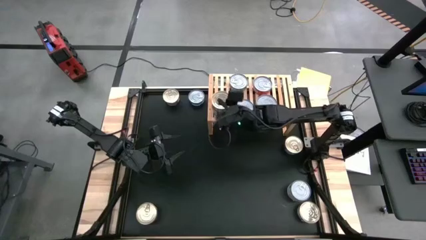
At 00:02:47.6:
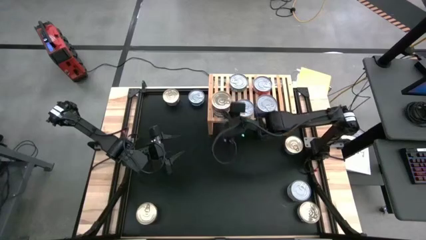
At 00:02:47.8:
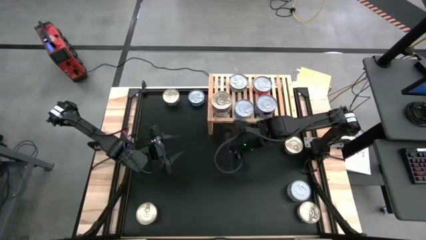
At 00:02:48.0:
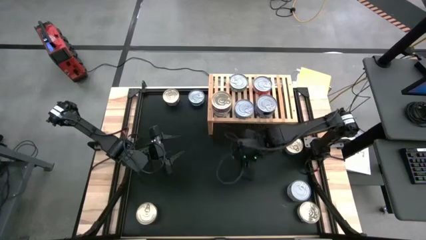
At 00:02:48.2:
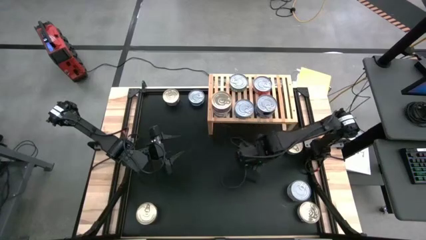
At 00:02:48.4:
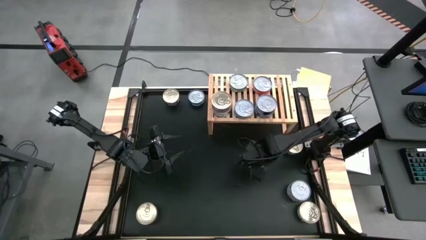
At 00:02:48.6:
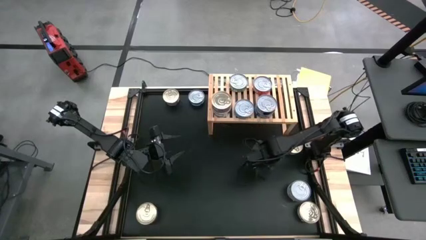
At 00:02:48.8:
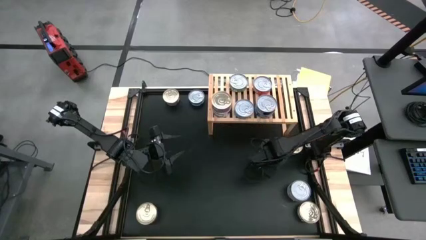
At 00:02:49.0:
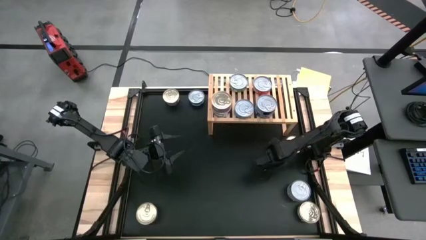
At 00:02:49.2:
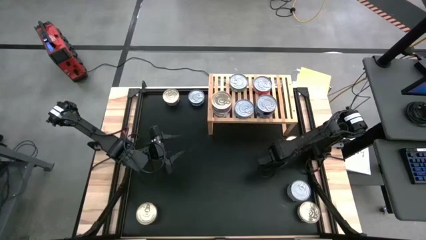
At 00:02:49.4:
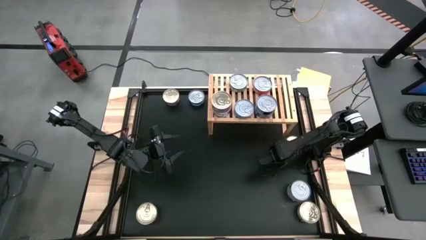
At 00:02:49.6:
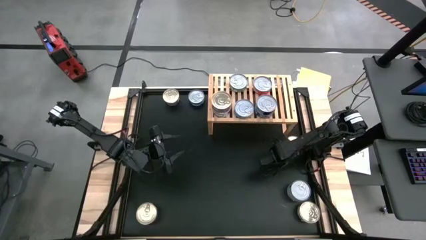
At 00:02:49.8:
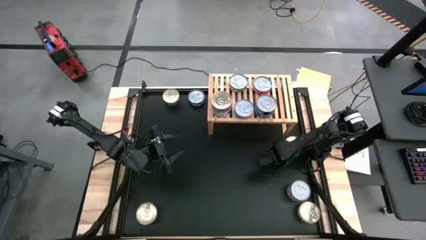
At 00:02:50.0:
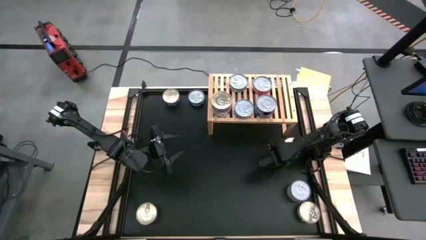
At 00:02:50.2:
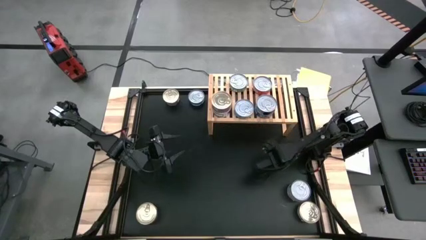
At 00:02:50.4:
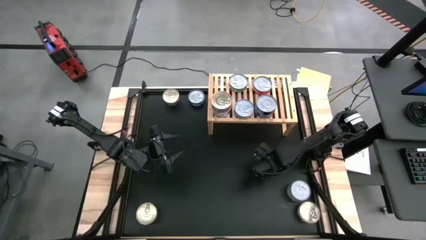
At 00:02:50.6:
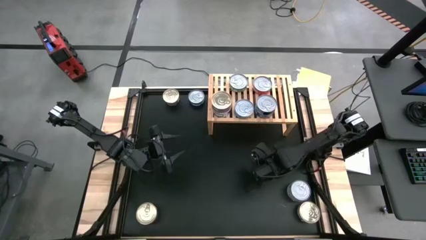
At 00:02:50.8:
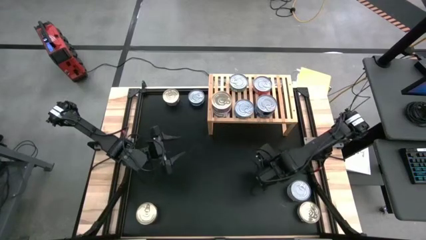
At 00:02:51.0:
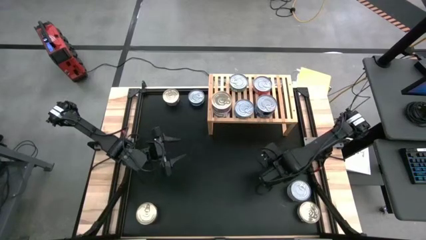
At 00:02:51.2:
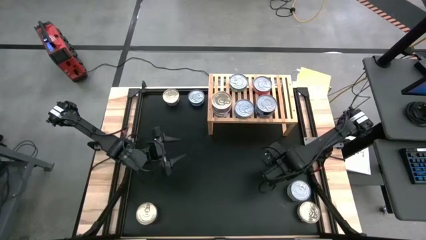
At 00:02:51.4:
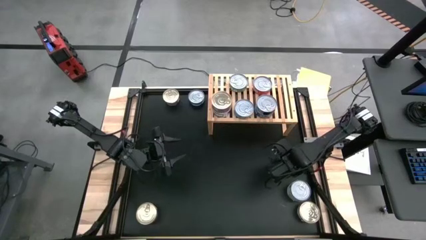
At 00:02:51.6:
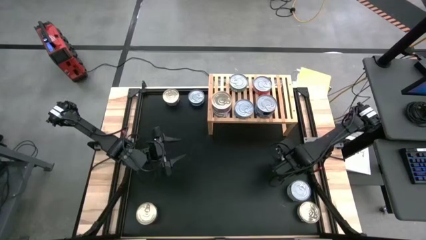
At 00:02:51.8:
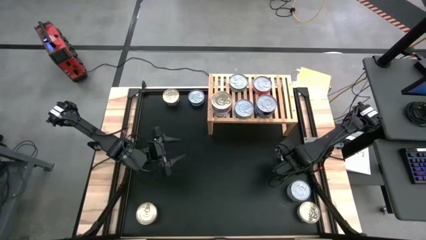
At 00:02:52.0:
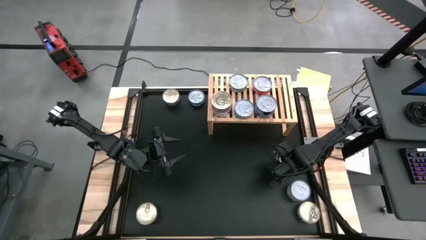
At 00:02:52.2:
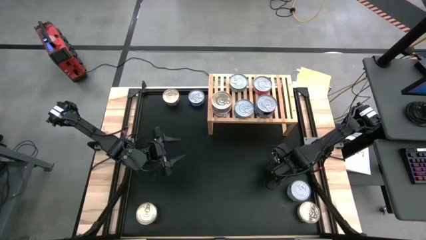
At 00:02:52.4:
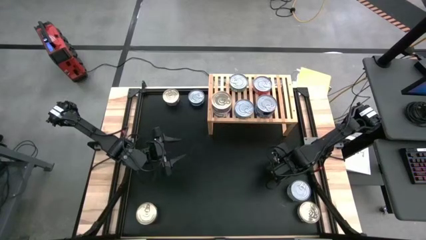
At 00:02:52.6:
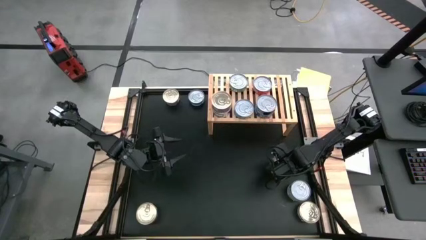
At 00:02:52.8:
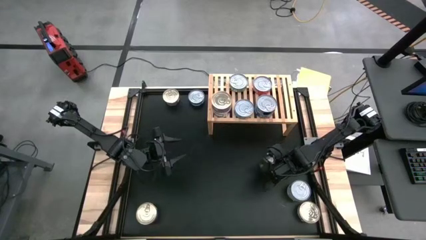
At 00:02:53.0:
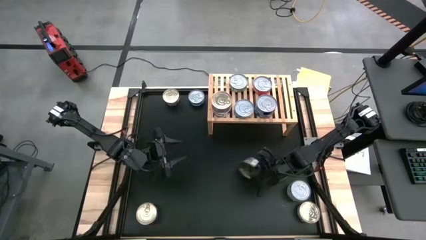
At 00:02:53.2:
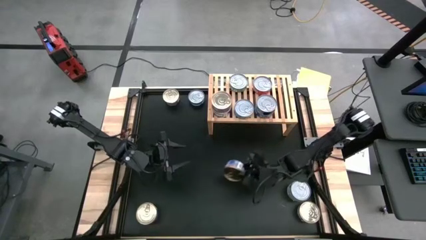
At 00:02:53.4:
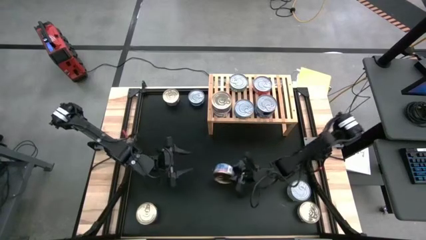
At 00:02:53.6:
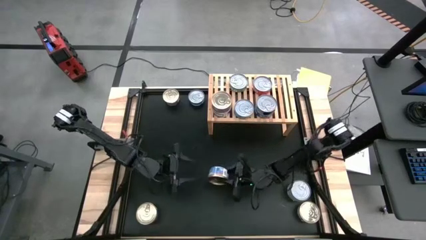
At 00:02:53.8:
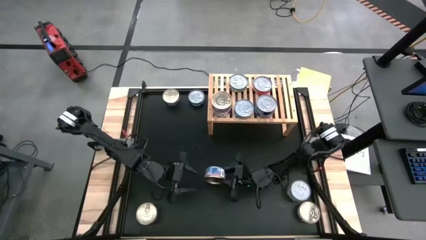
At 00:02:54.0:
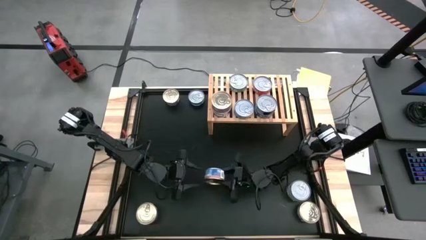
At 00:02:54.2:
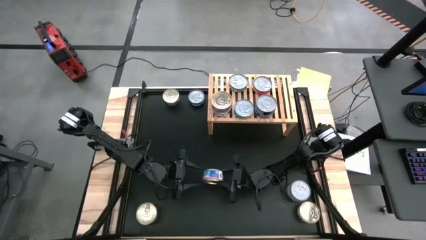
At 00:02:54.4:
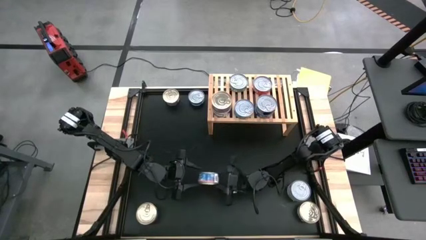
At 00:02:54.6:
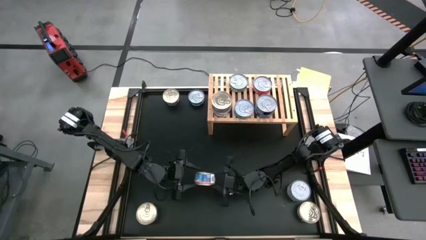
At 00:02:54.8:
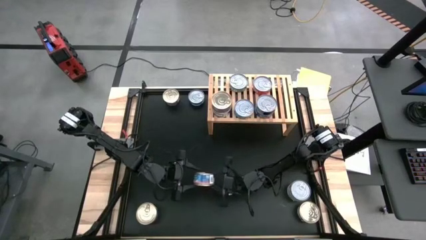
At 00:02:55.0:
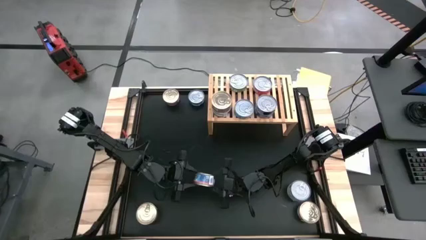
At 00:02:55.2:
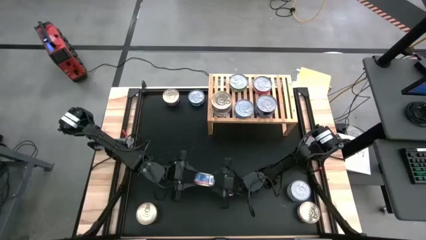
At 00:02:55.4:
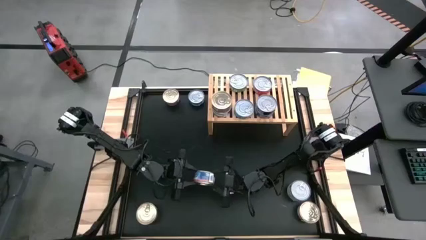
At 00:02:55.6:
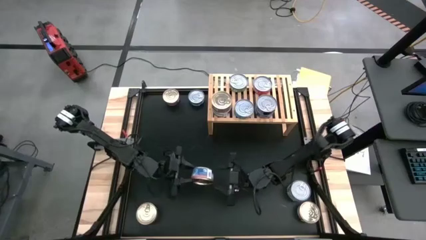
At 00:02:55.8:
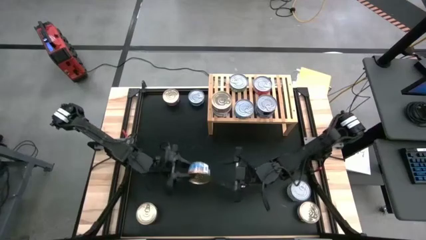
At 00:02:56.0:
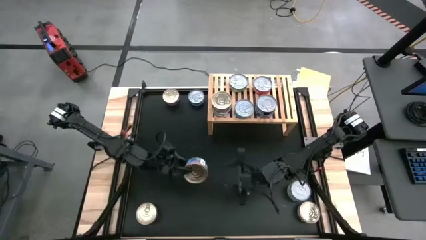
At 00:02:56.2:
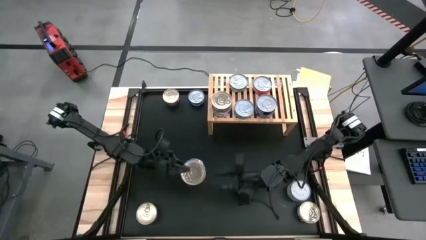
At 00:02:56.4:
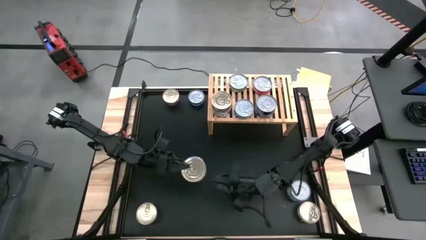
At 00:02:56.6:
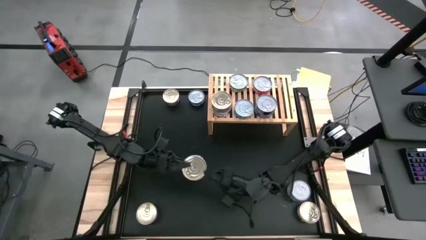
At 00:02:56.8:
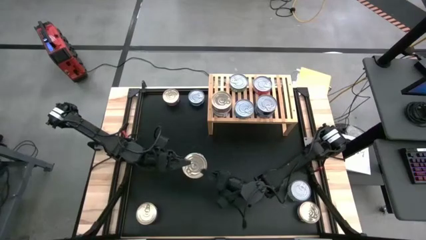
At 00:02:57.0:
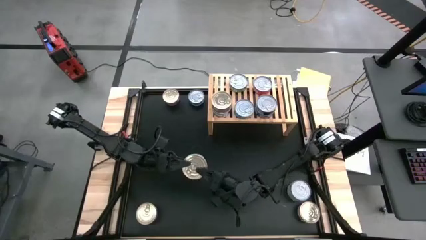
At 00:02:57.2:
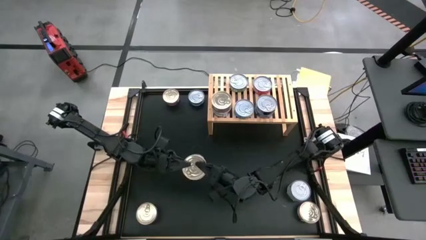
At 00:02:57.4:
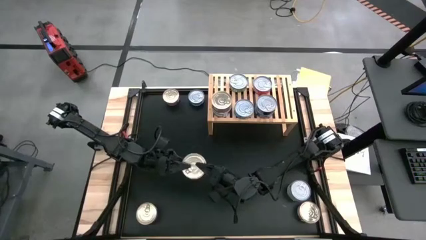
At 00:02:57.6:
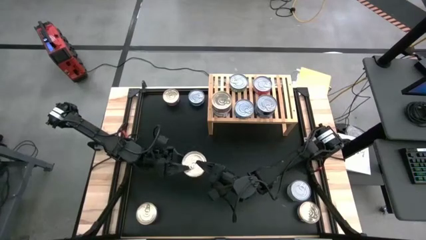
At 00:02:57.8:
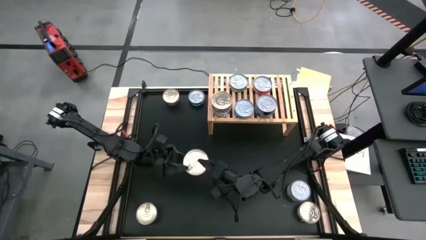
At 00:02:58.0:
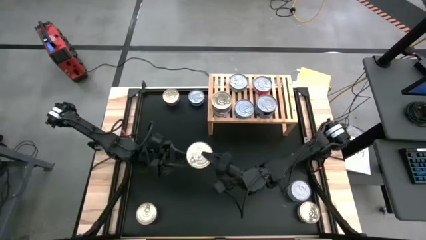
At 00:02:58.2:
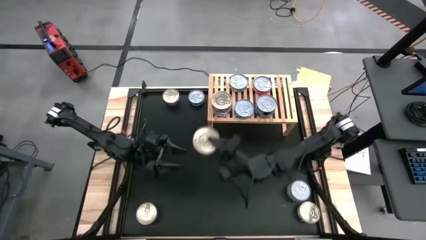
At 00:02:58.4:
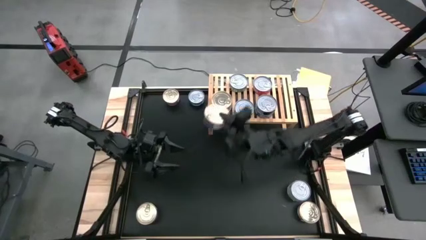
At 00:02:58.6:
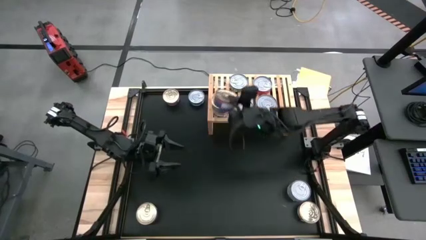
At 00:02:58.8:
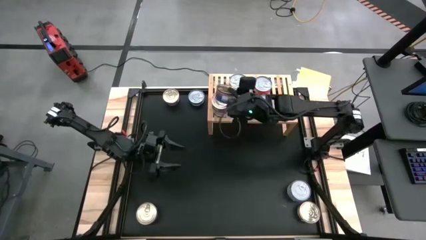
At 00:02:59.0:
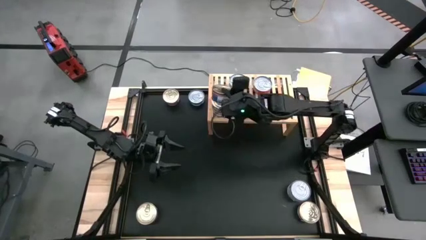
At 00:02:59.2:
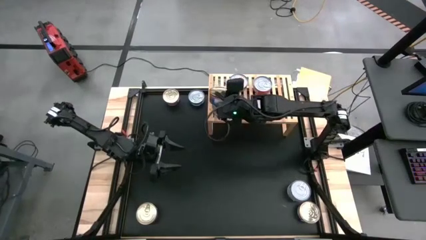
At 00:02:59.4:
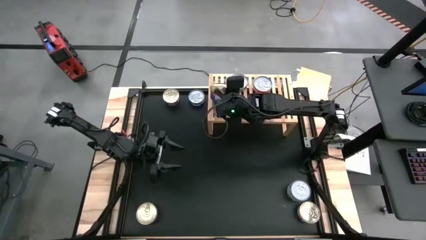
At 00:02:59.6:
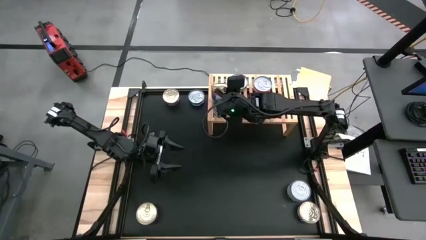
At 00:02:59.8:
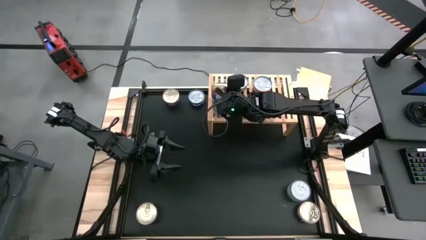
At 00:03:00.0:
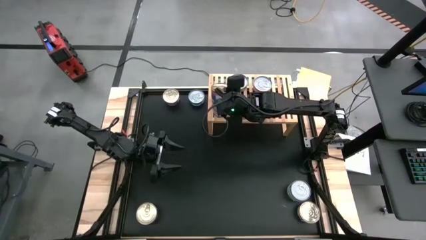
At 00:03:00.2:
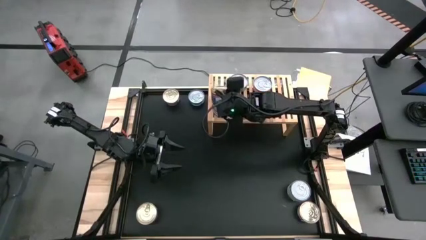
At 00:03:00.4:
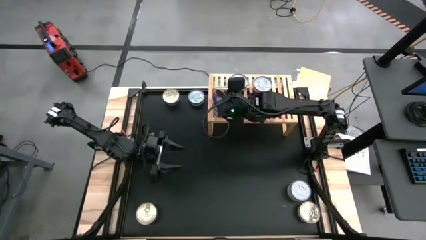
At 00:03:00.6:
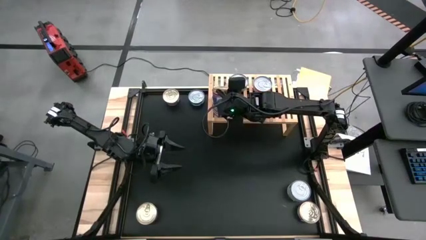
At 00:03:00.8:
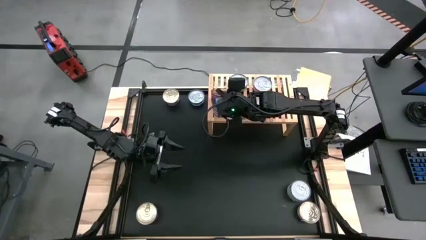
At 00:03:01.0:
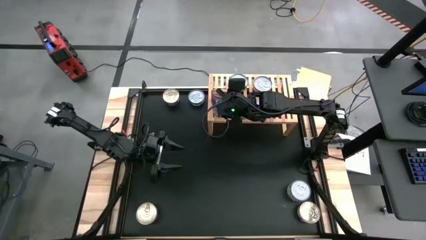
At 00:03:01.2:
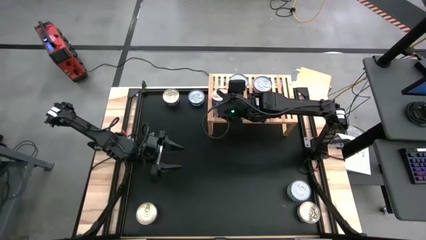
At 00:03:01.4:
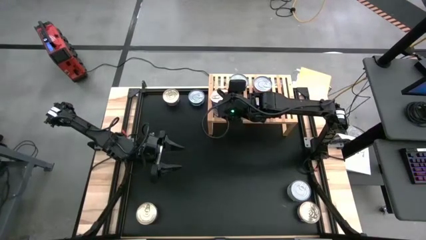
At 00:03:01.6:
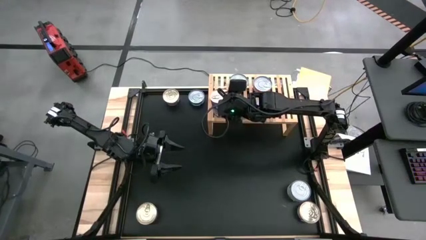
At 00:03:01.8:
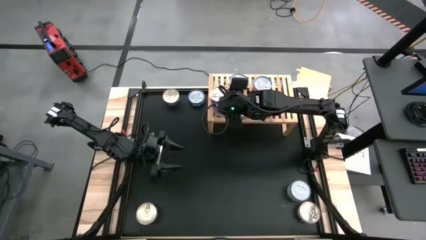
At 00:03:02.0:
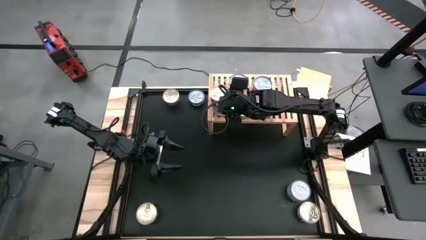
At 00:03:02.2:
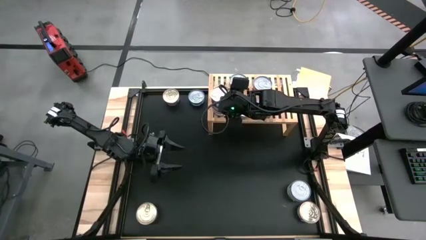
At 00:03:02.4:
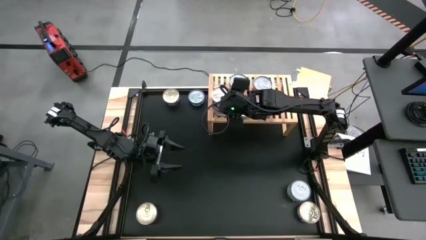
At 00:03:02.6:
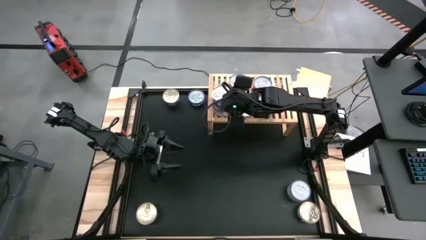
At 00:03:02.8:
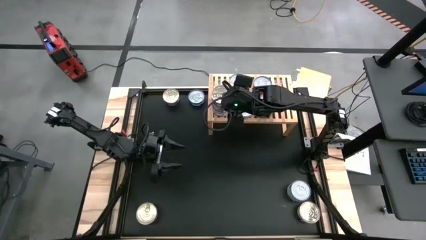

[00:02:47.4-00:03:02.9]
Task: Stack canned seafood by type on shelf
Stack the blue-pink tuna can on top of the blue-pink tuna can on the shelf
